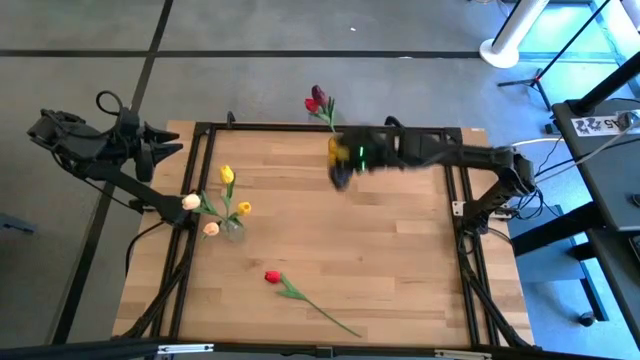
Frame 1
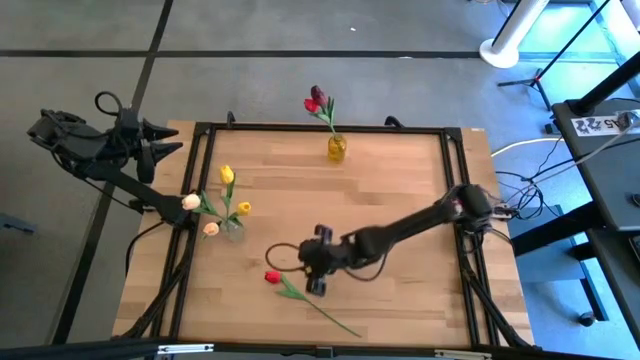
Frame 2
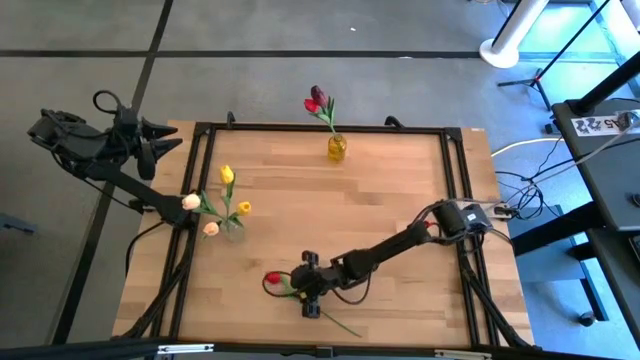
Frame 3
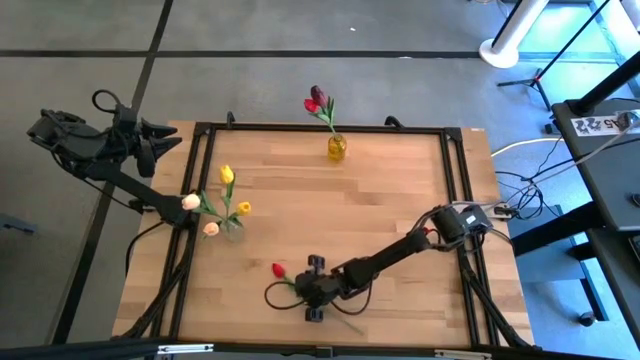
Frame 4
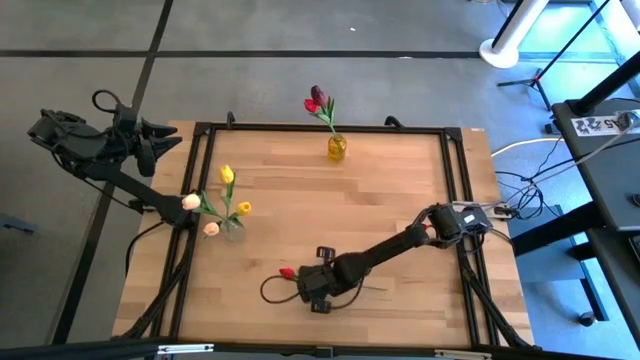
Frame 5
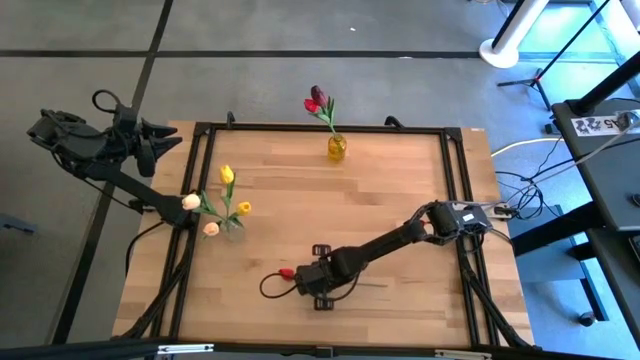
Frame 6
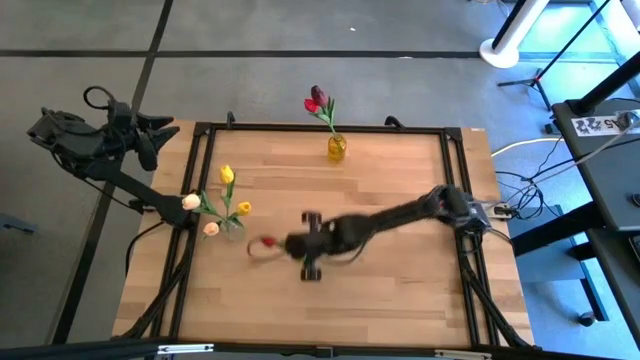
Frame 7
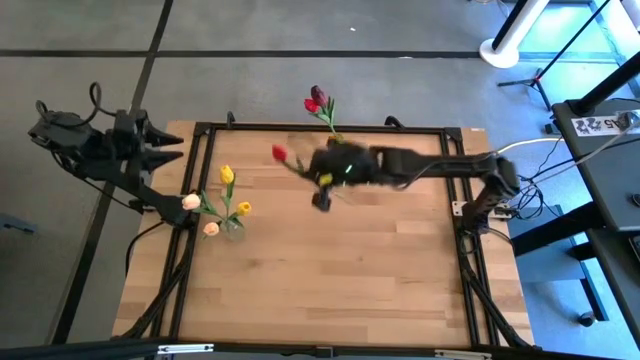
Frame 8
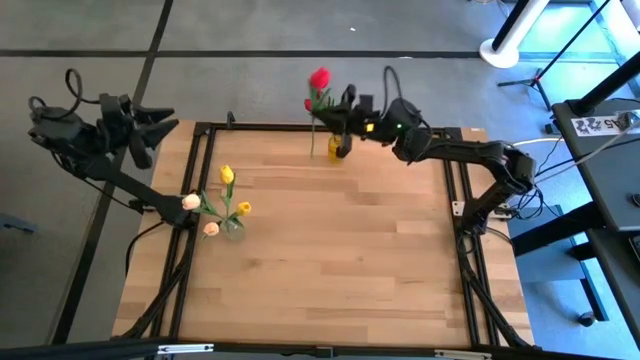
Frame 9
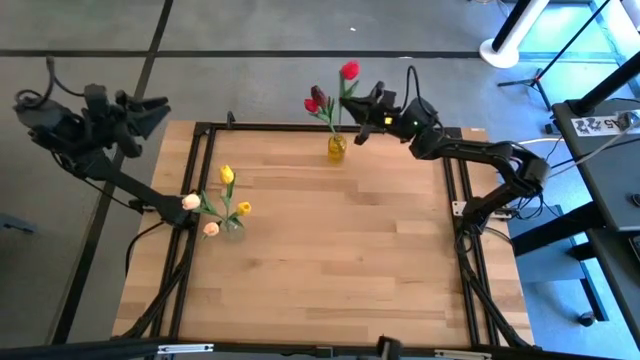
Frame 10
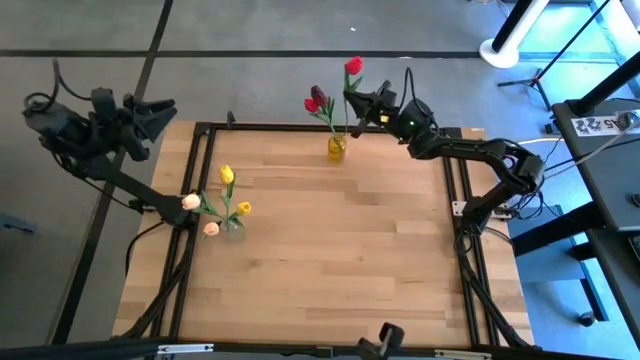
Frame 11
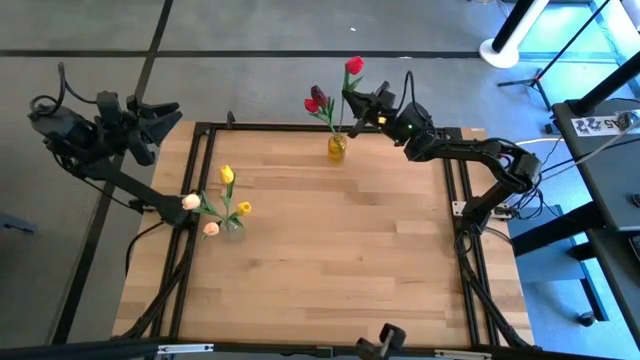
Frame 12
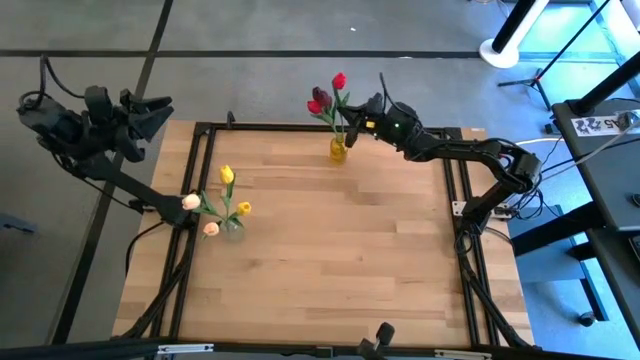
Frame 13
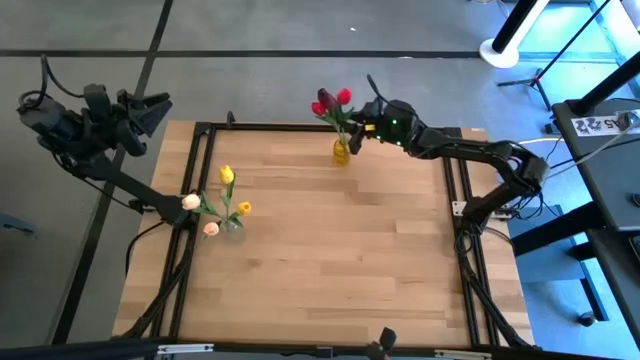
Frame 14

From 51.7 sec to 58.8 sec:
Task: Sort flowers into vase by color
Put the red flower into the yellow vase

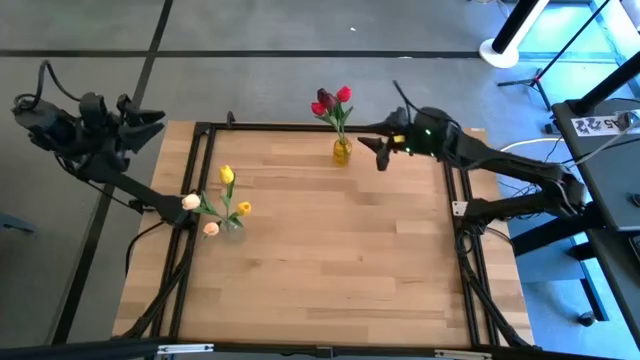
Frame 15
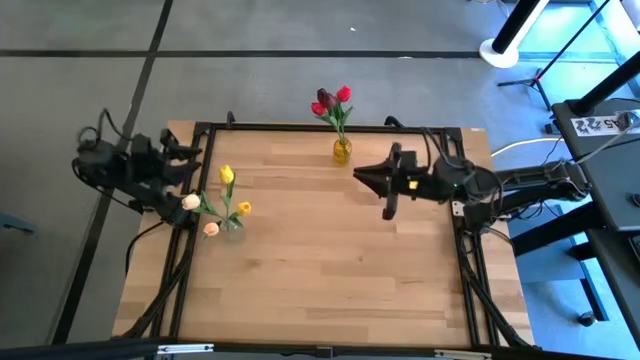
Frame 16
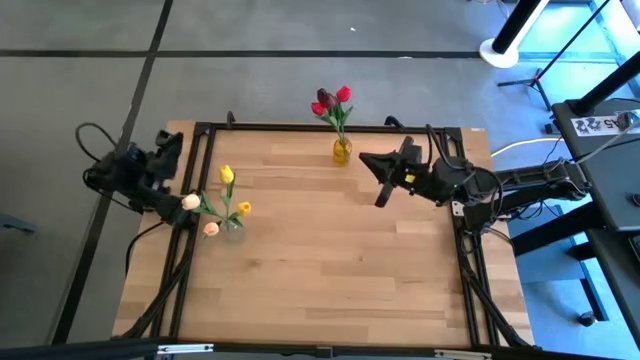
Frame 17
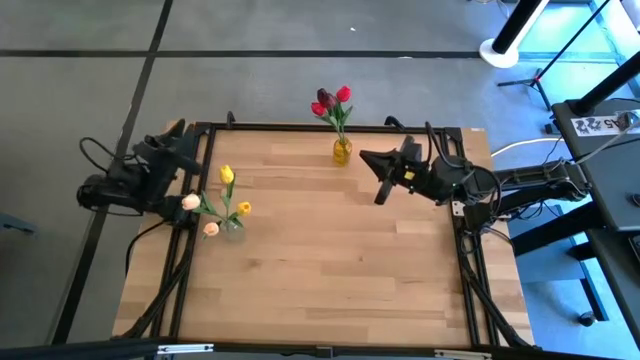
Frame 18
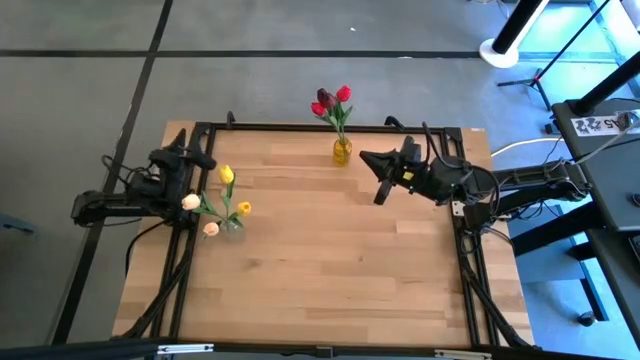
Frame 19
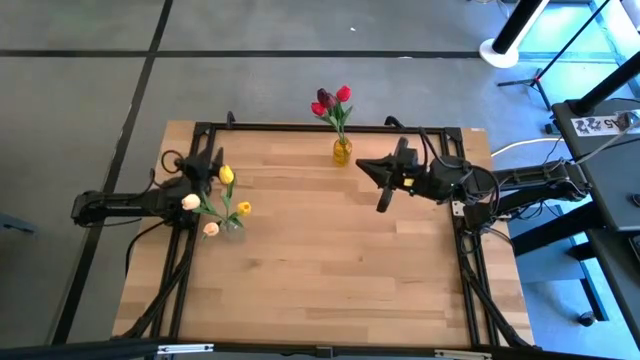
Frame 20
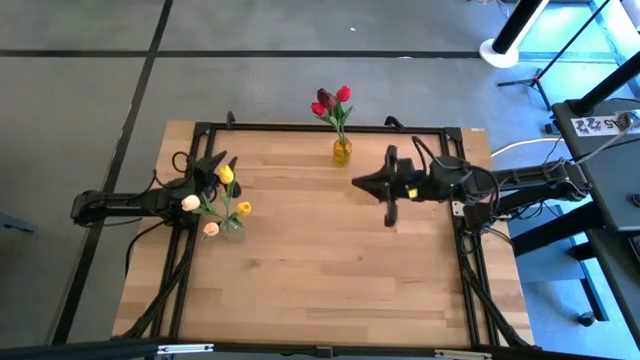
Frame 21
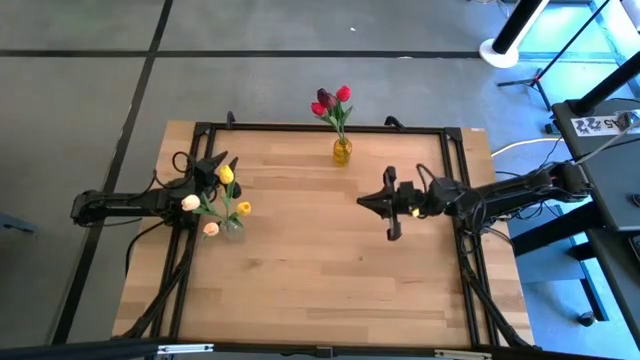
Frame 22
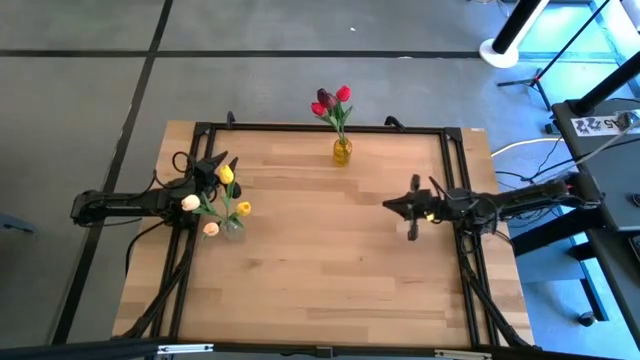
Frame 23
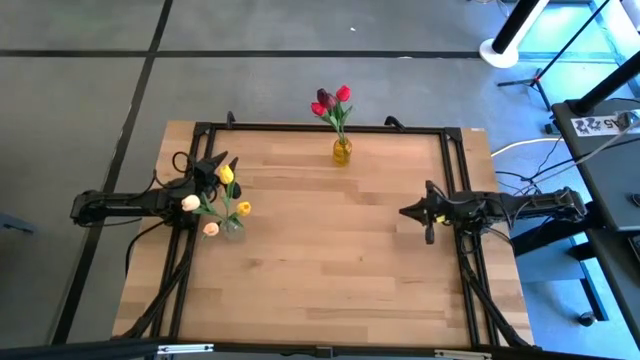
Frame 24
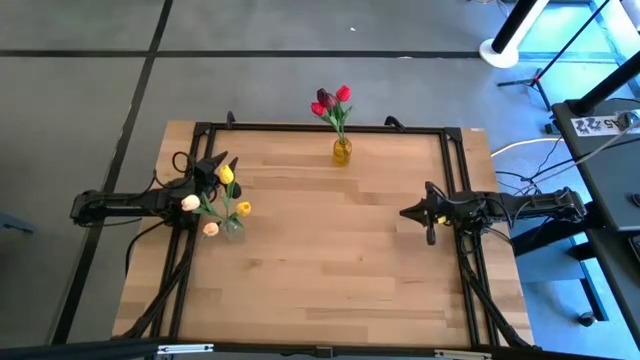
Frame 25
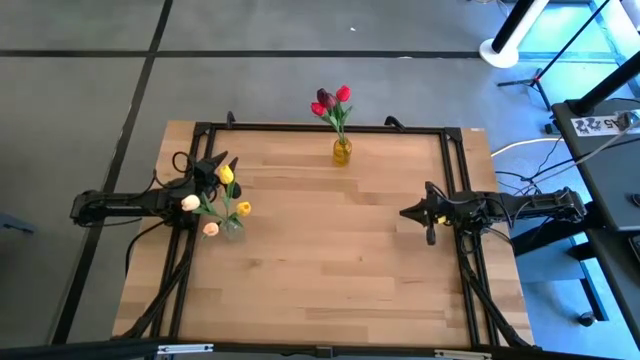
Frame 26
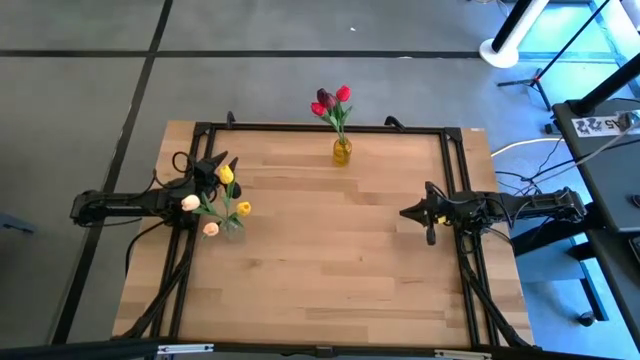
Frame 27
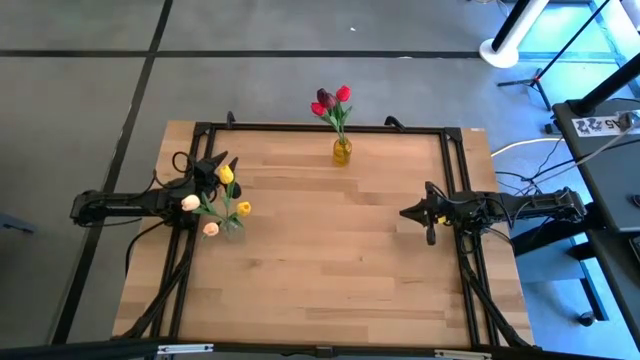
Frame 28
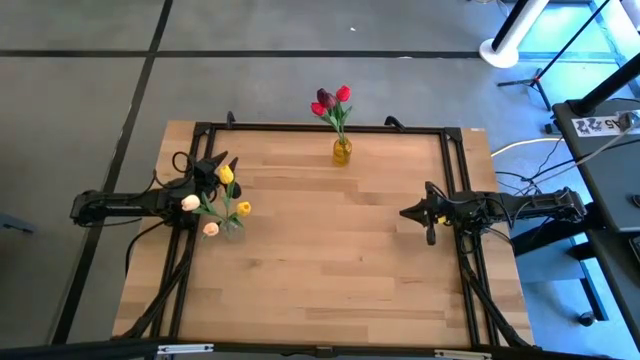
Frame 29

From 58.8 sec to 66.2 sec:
Return to Home Position

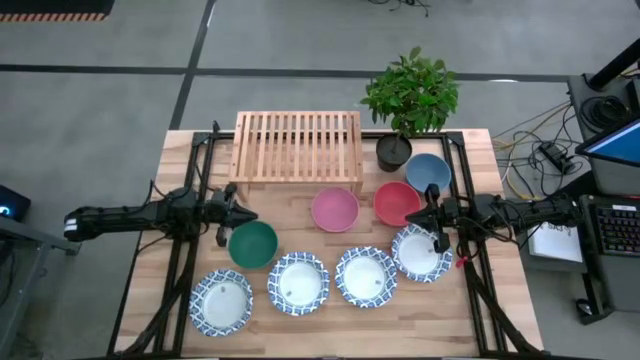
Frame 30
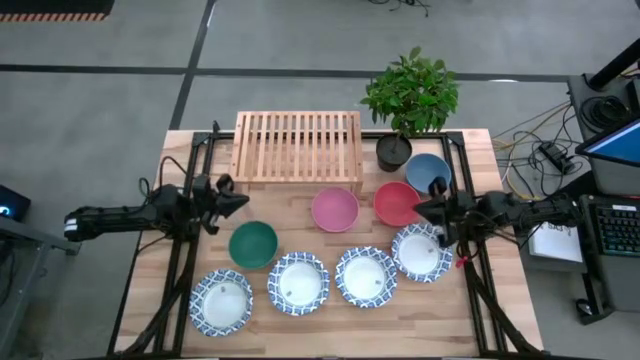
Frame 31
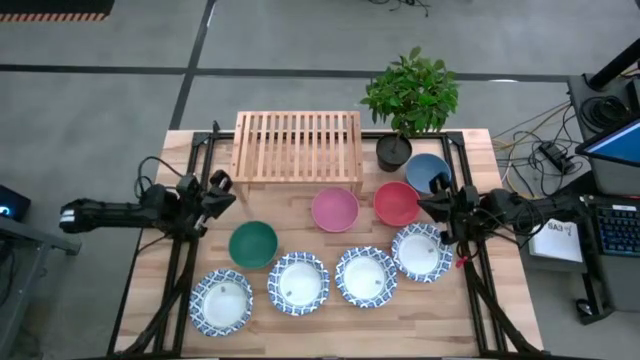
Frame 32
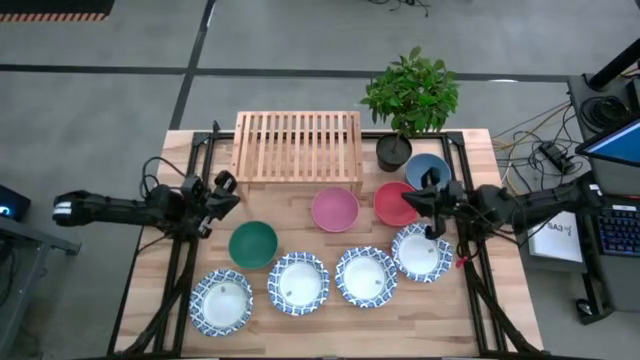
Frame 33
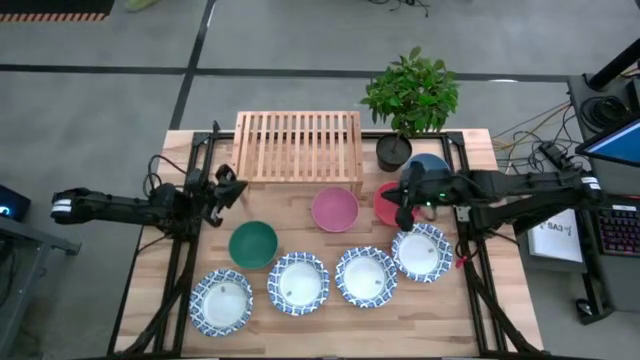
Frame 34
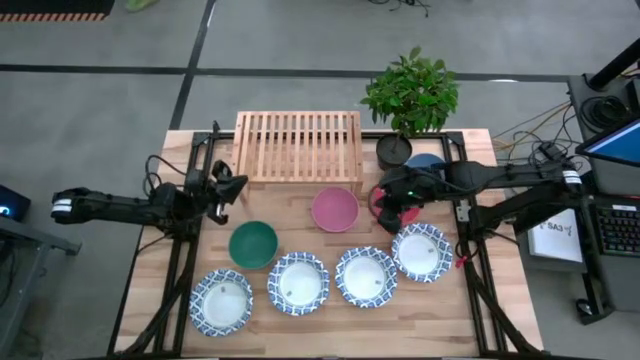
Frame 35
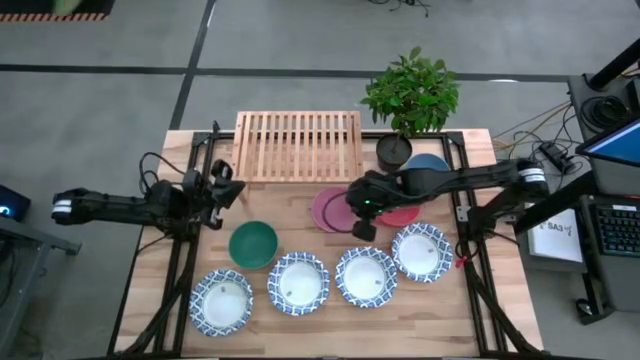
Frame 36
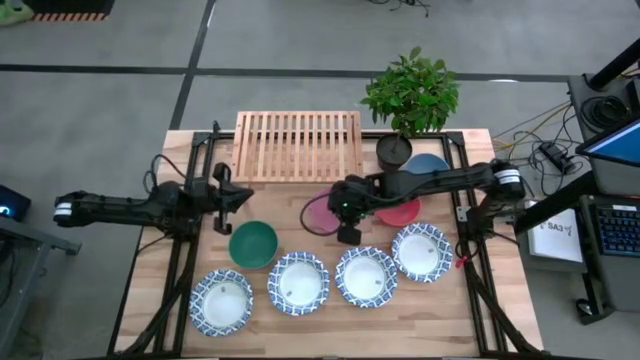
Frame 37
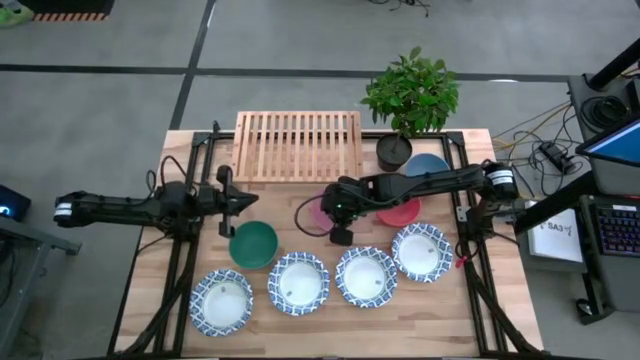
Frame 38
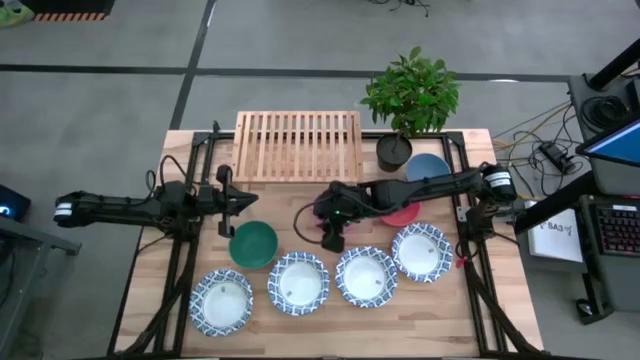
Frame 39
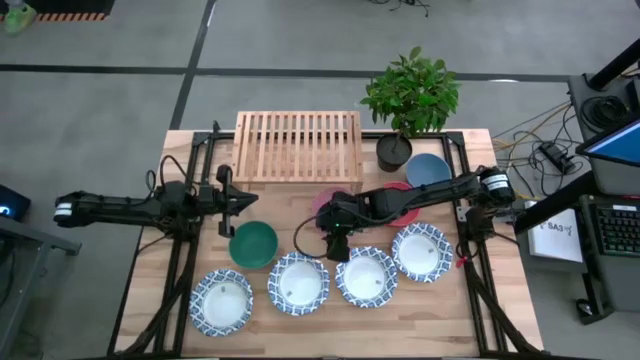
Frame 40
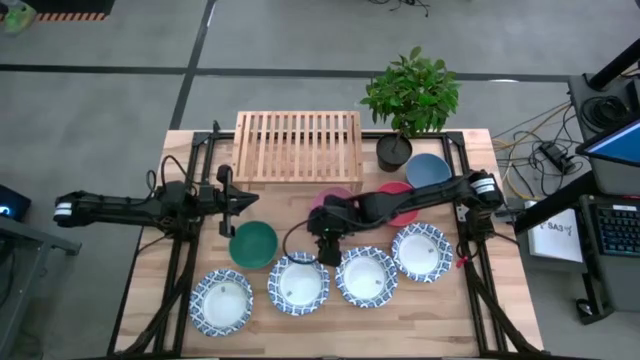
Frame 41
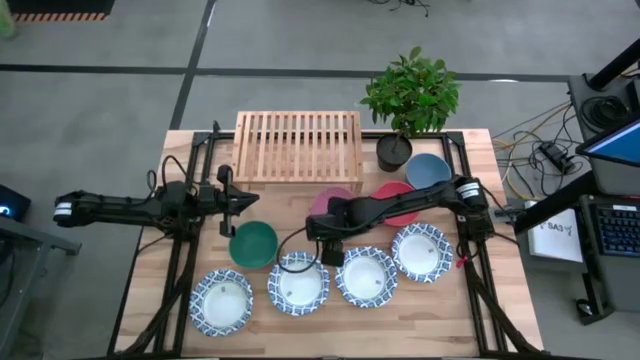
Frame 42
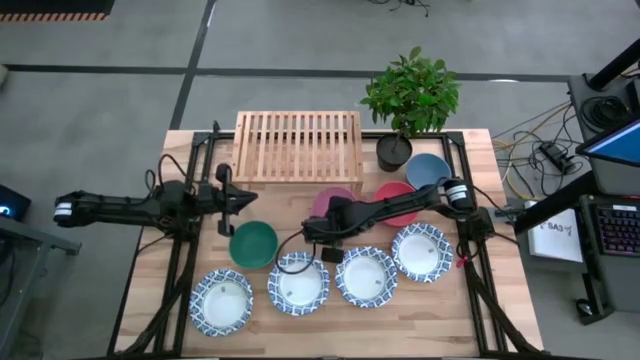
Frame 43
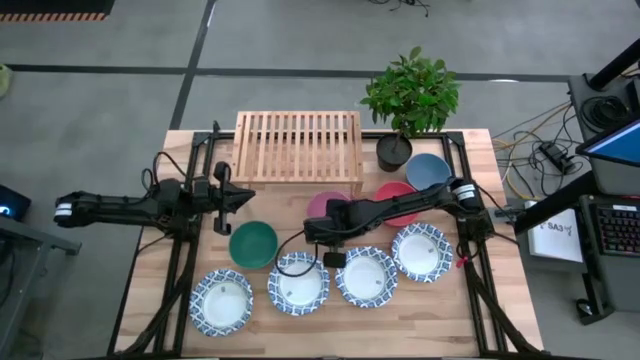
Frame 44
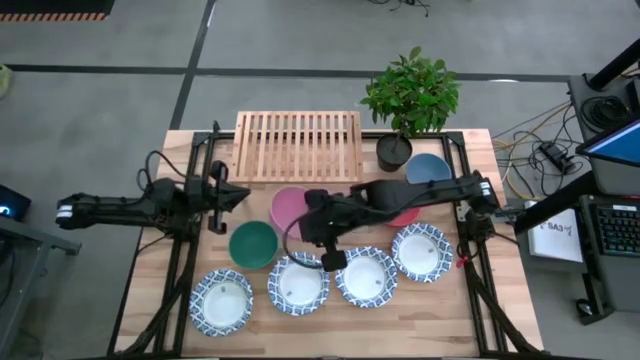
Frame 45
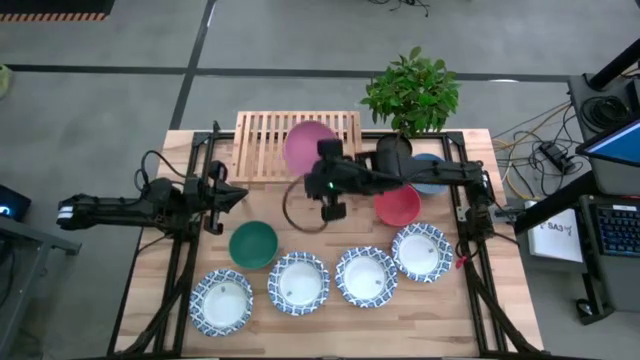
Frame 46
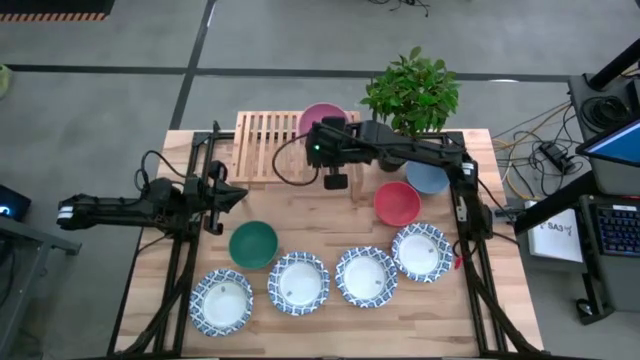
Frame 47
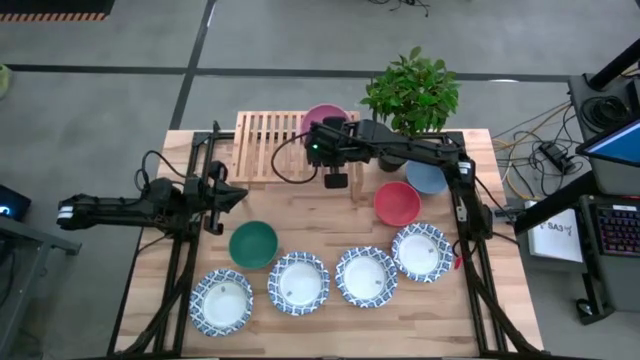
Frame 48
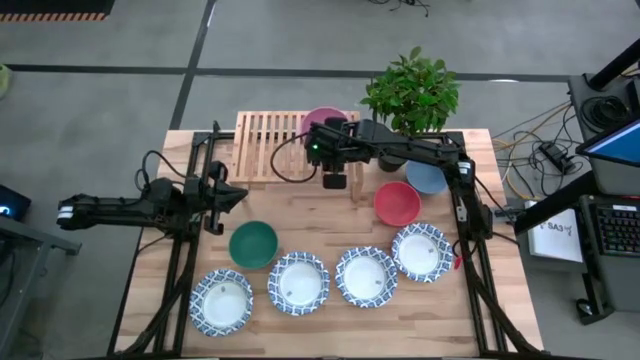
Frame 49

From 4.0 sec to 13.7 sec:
Task: Place and stack bowls onto a shelf
Put the pink bowl on the shelf
